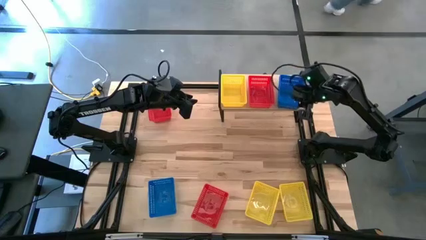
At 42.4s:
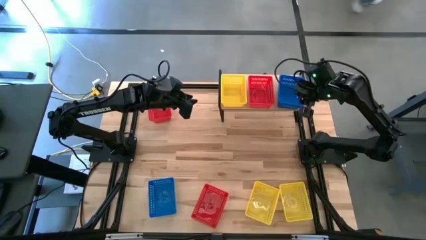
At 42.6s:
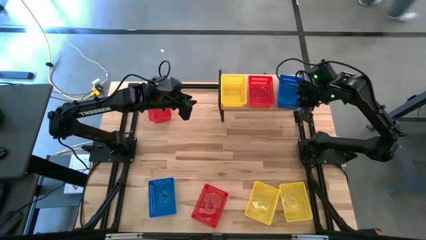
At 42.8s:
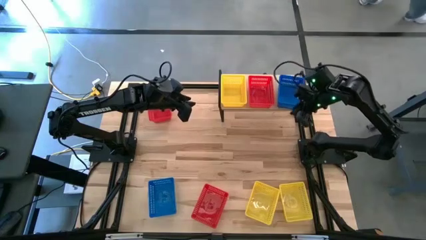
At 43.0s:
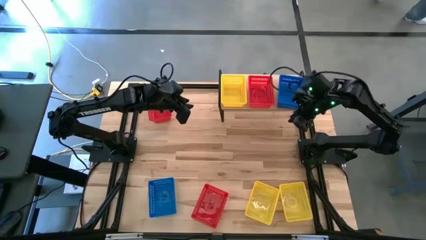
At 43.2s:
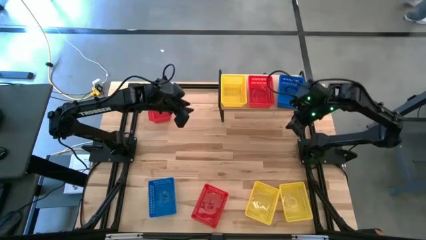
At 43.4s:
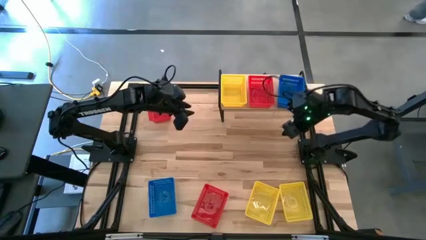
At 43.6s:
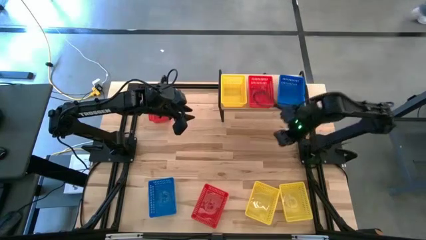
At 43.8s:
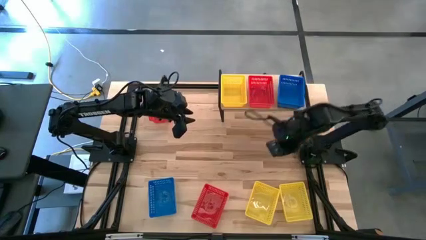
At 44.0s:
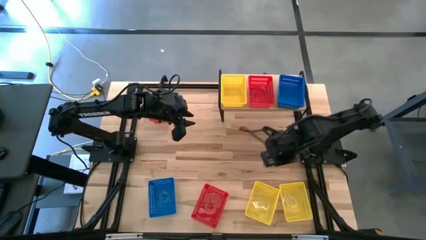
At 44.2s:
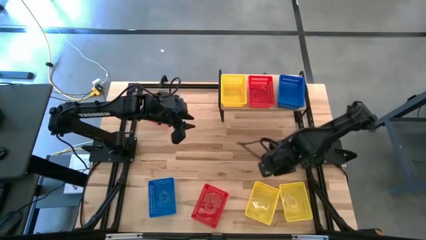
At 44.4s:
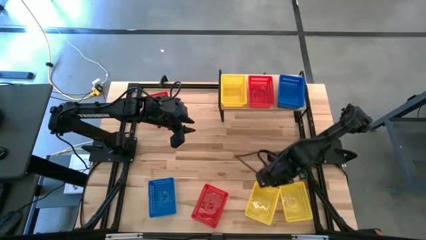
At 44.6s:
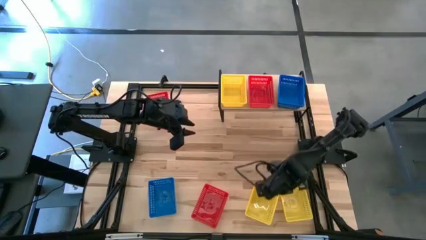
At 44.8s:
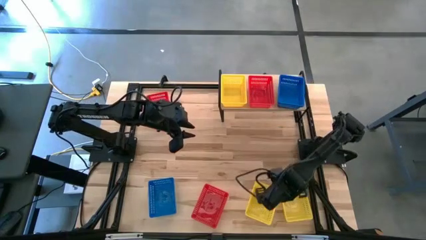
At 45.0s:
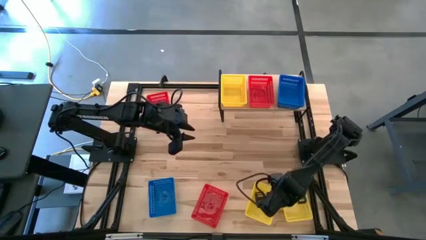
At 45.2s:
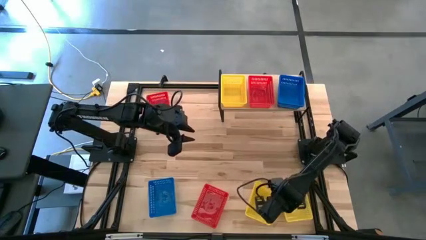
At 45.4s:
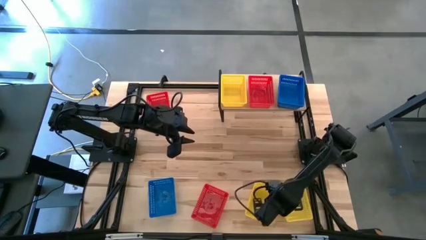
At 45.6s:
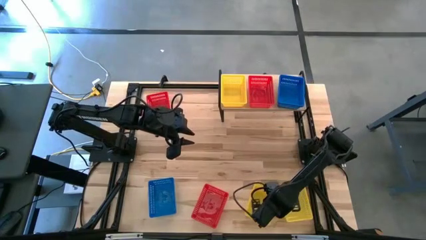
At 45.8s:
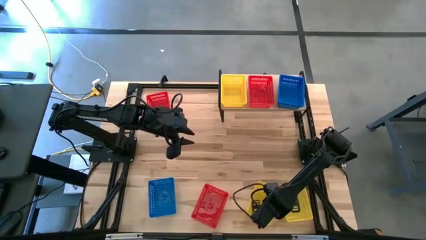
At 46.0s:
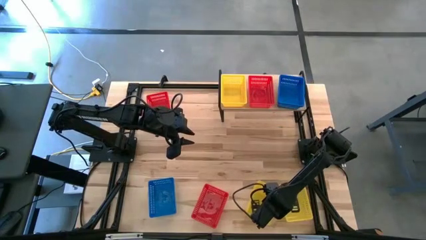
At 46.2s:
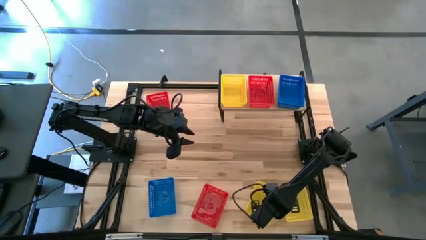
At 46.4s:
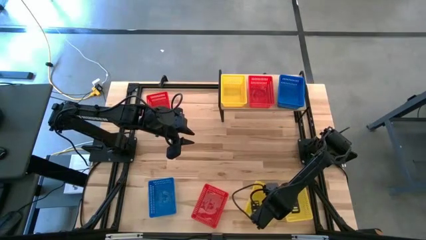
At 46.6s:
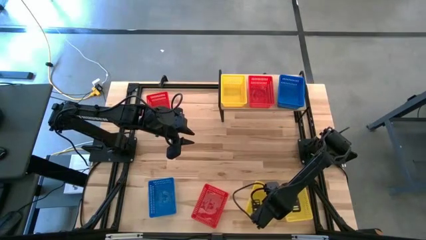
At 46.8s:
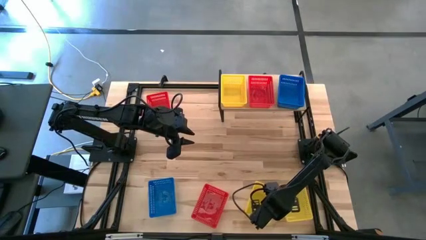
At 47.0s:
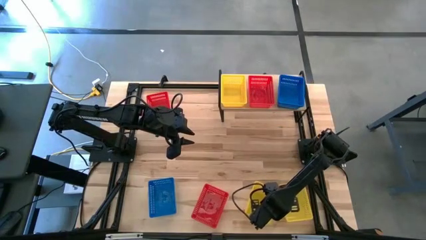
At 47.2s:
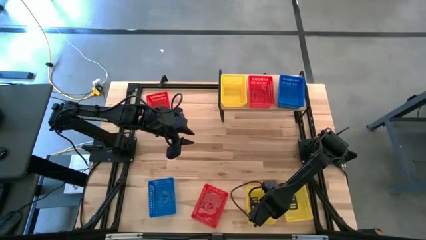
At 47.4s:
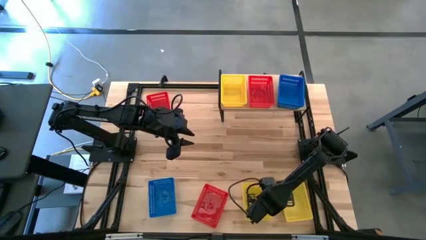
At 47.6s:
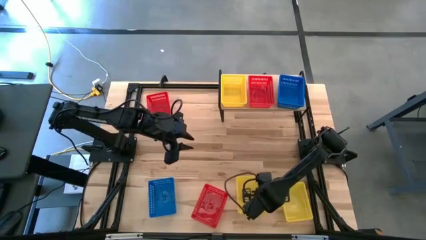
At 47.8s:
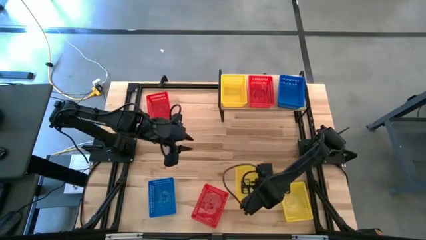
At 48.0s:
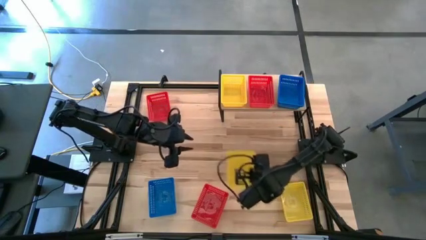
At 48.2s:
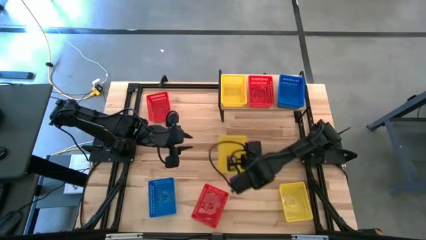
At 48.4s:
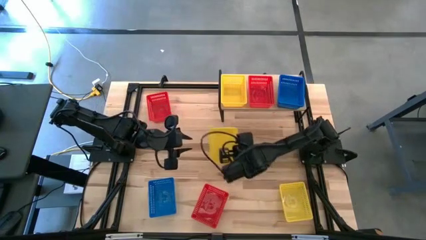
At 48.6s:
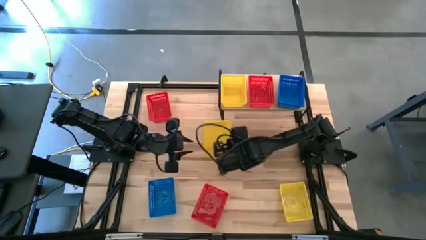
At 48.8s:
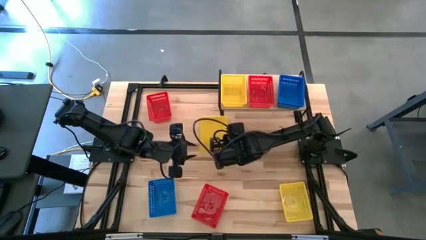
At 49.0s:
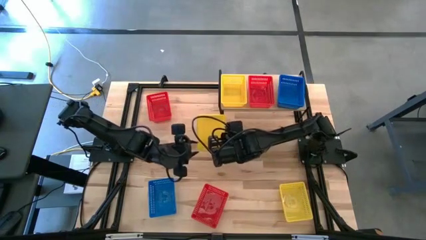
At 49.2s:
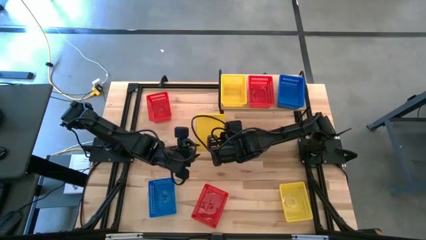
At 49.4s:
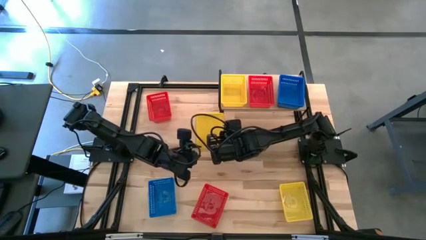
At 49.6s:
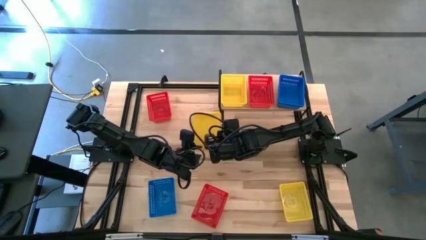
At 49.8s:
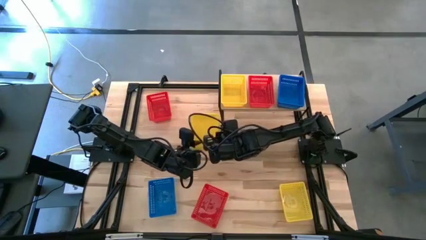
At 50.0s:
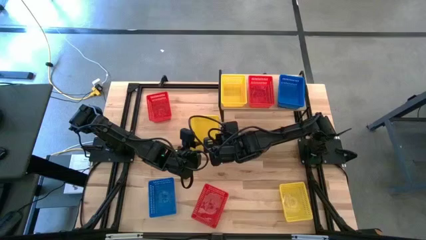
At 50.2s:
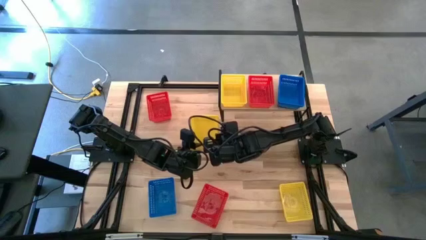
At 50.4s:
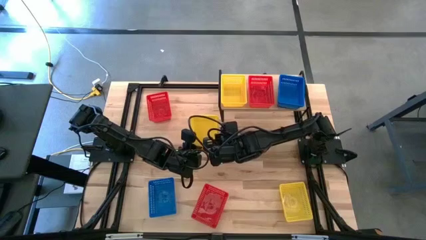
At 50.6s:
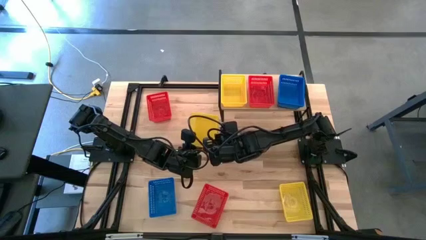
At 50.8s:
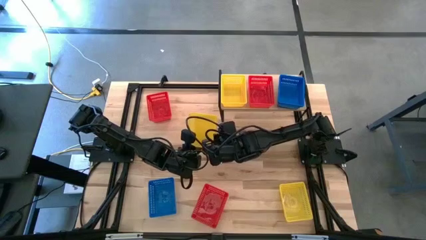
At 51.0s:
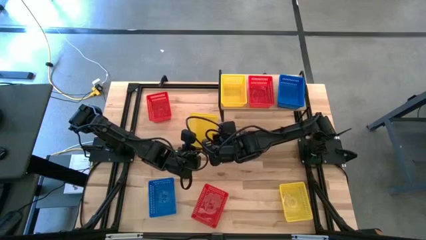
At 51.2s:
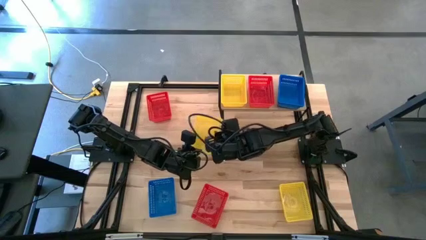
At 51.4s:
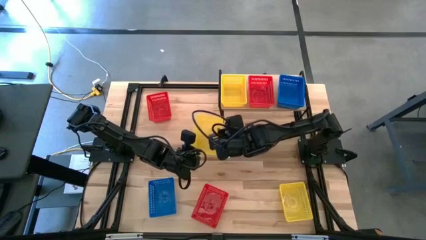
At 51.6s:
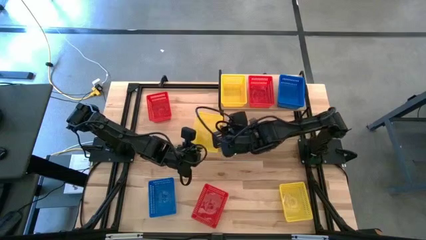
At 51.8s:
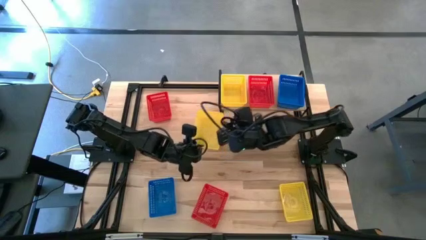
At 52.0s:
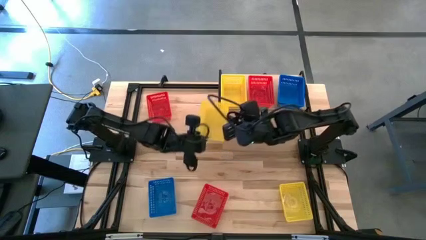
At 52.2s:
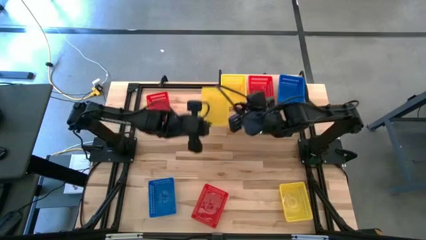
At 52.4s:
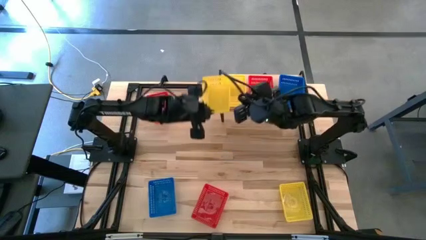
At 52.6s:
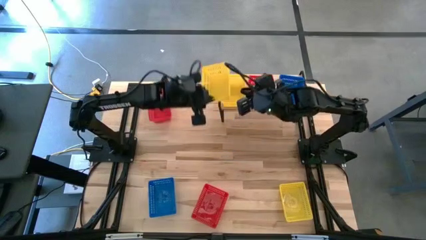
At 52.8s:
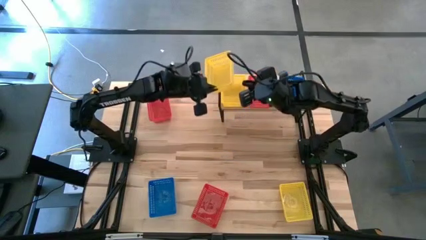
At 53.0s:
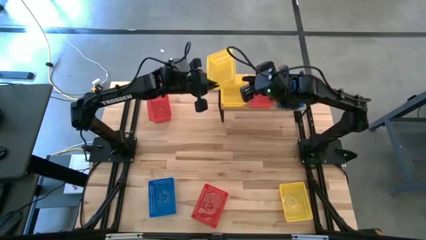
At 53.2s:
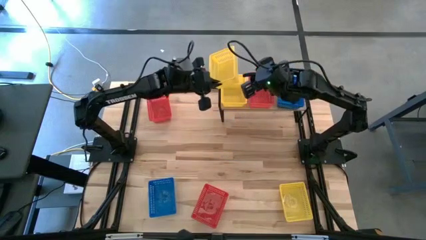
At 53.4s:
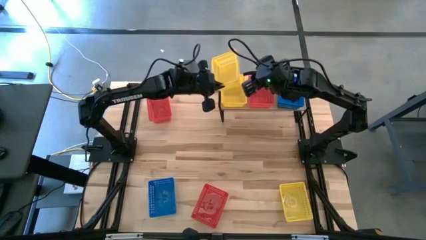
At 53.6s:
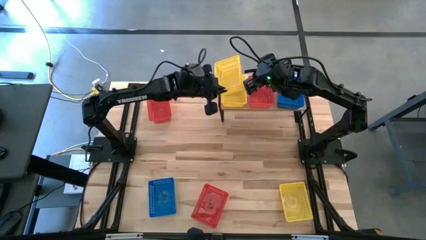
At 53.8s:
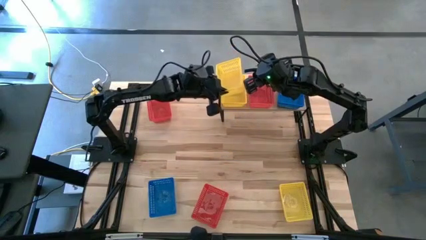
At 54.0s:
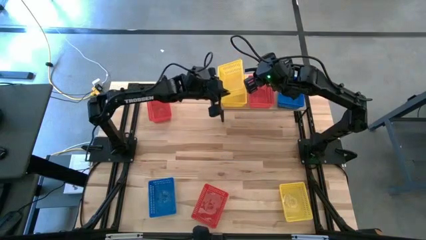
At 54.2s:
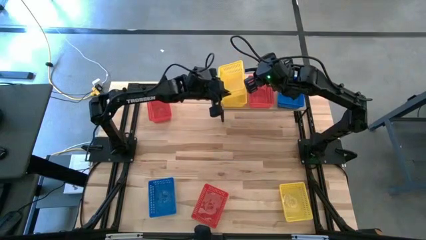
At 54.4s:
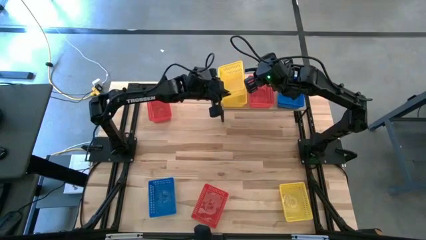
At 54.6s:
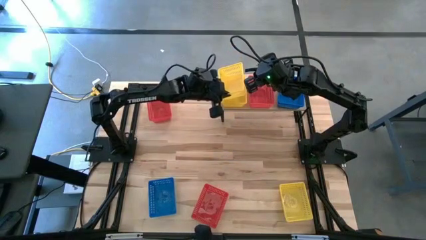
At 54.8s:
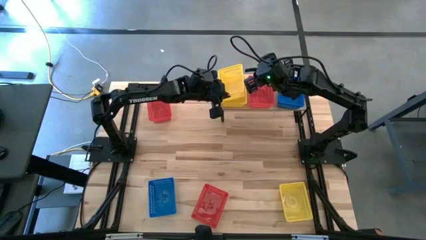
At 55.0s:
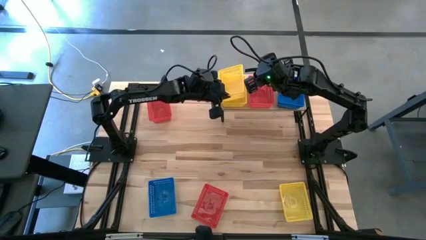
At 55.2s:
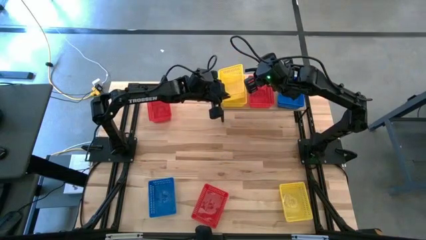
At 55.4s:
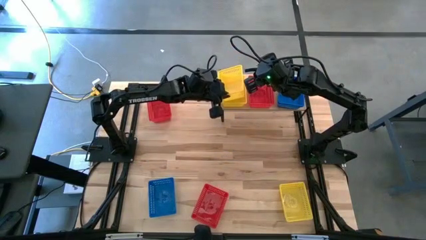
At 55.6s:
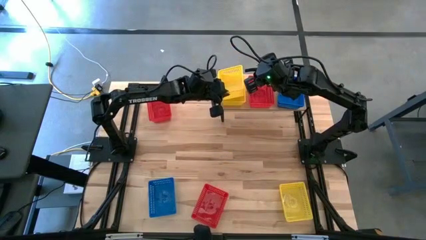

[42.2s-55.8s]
Task: Stack baskets on shelf by color
Stack the left yellow basket on the yellow basket on the shelf
